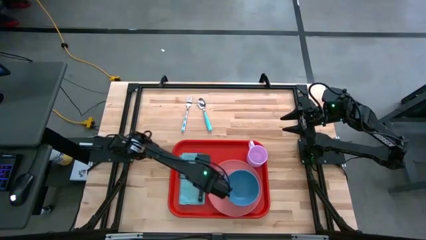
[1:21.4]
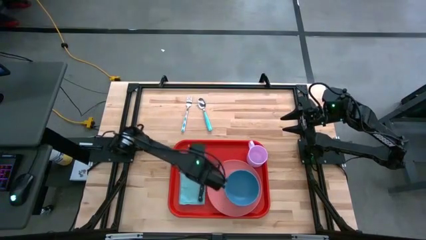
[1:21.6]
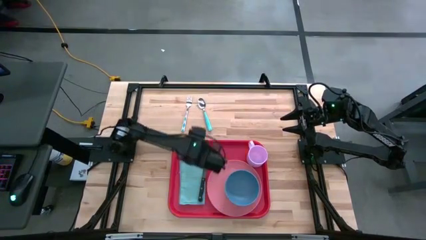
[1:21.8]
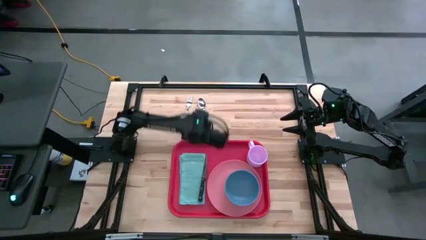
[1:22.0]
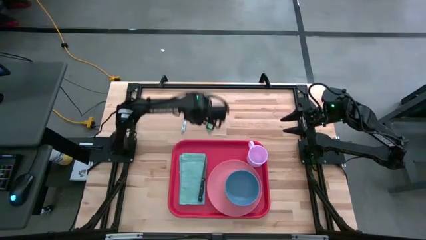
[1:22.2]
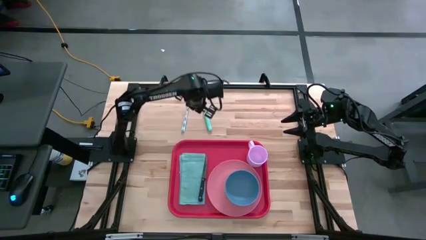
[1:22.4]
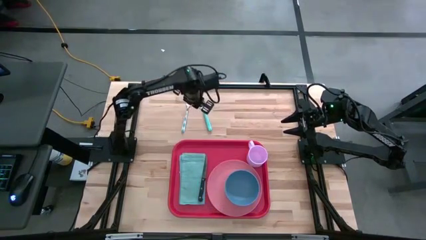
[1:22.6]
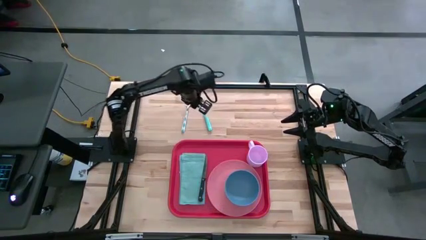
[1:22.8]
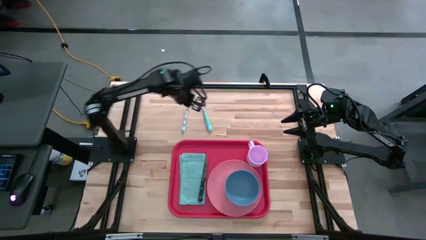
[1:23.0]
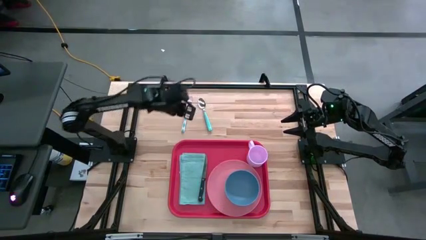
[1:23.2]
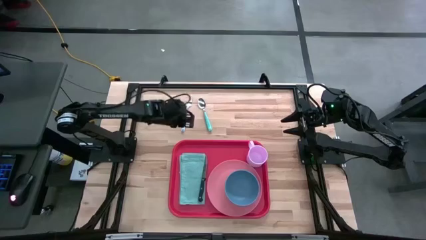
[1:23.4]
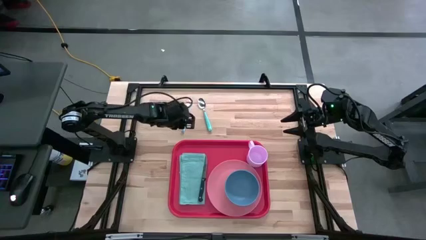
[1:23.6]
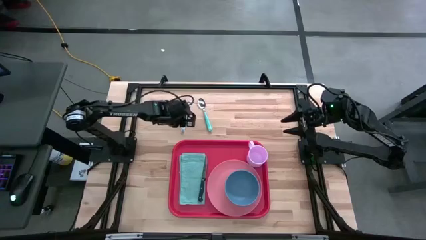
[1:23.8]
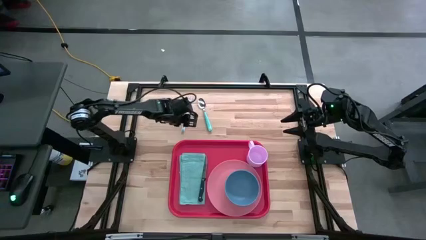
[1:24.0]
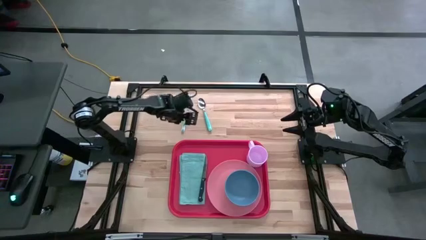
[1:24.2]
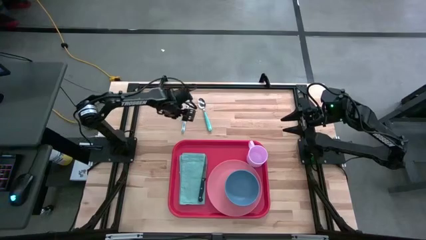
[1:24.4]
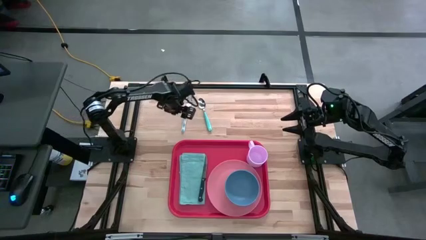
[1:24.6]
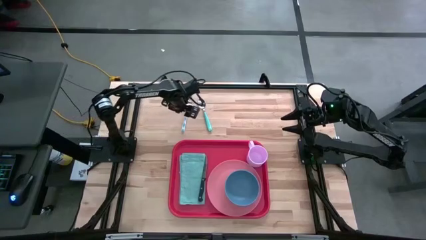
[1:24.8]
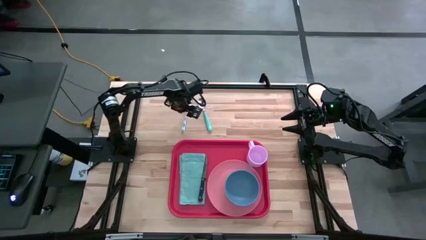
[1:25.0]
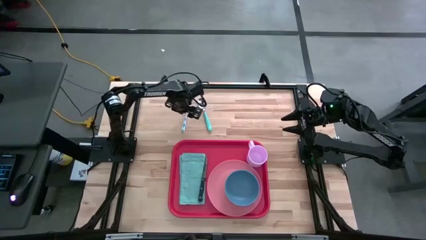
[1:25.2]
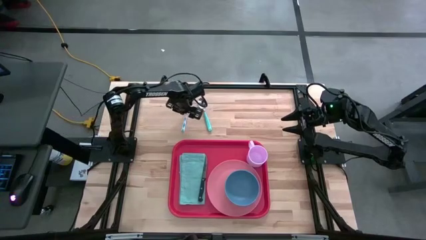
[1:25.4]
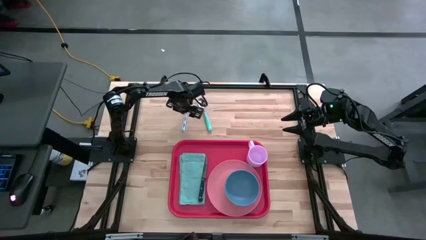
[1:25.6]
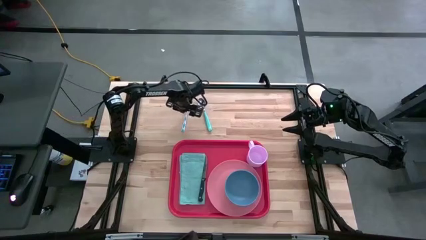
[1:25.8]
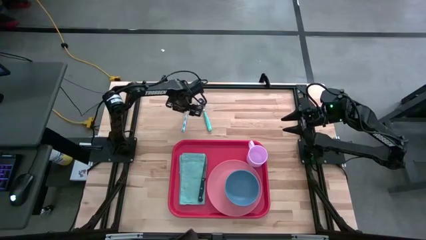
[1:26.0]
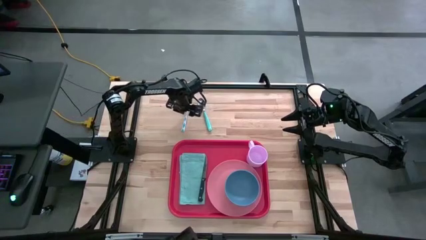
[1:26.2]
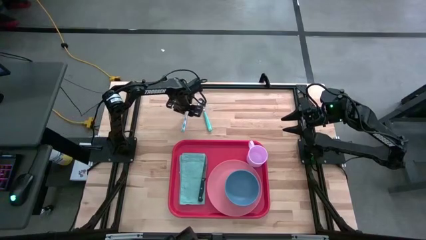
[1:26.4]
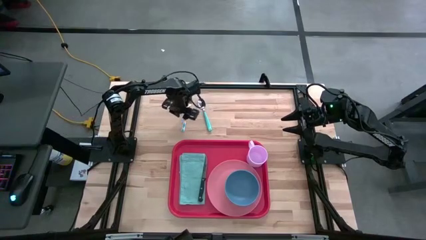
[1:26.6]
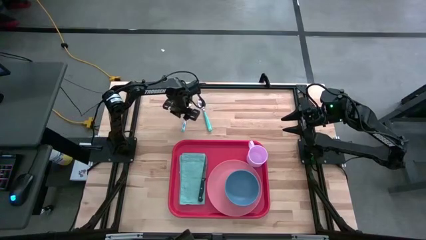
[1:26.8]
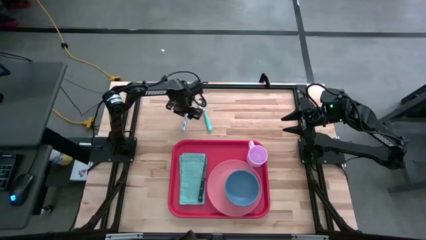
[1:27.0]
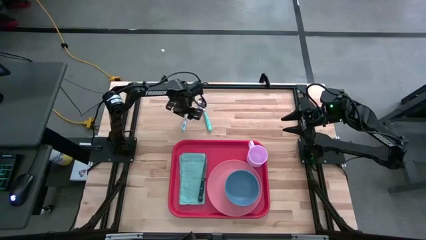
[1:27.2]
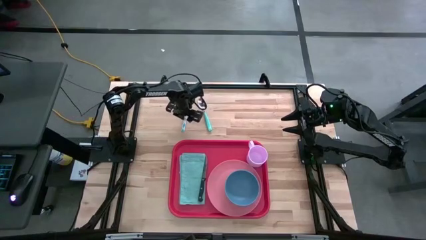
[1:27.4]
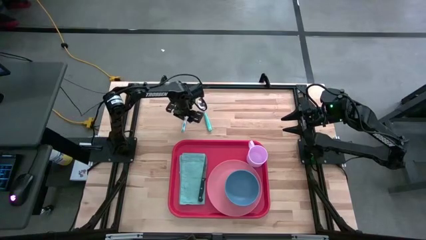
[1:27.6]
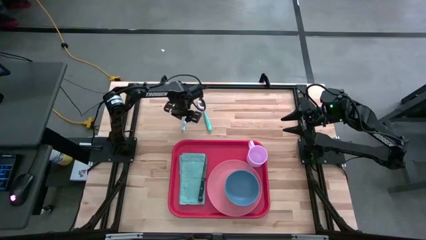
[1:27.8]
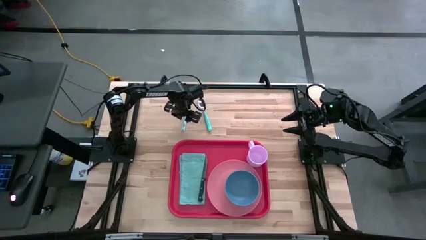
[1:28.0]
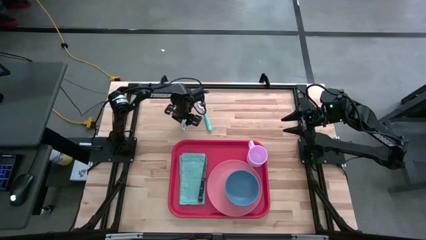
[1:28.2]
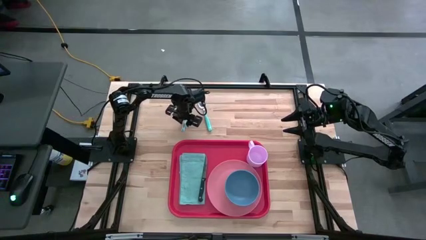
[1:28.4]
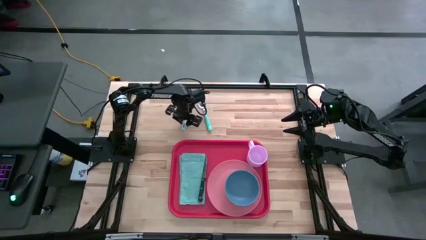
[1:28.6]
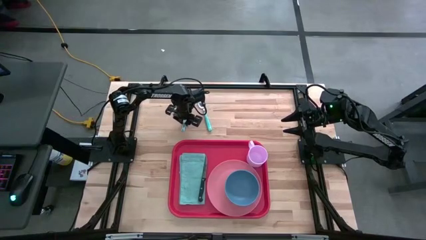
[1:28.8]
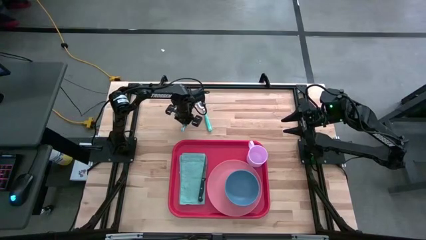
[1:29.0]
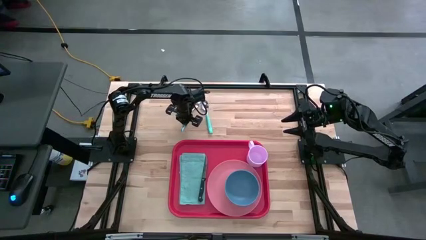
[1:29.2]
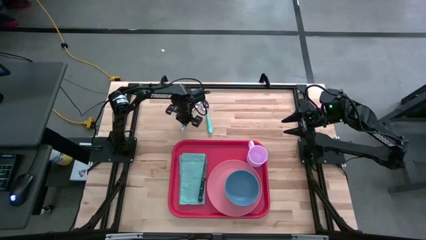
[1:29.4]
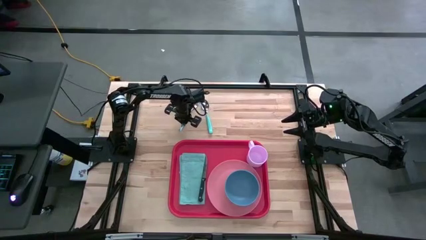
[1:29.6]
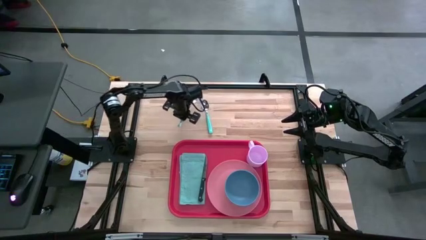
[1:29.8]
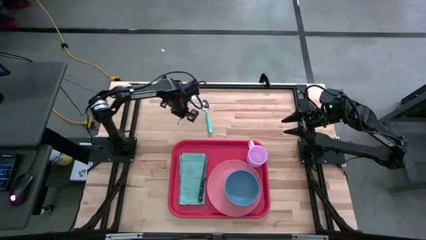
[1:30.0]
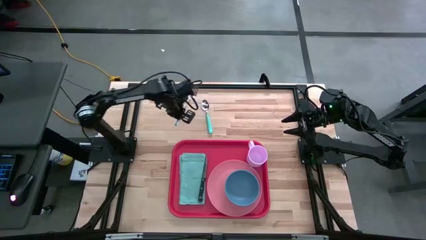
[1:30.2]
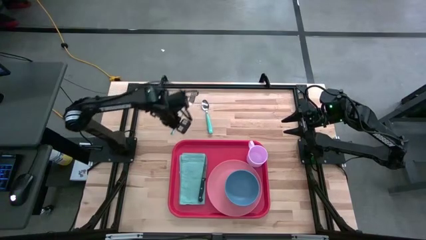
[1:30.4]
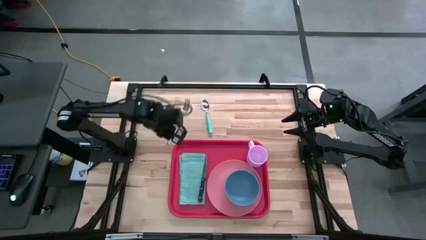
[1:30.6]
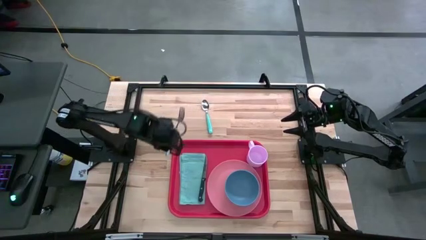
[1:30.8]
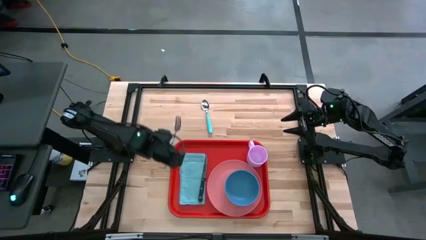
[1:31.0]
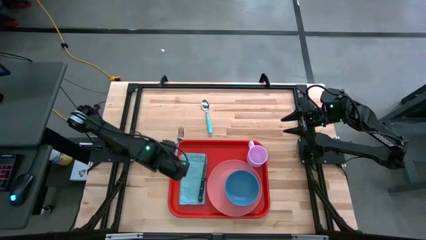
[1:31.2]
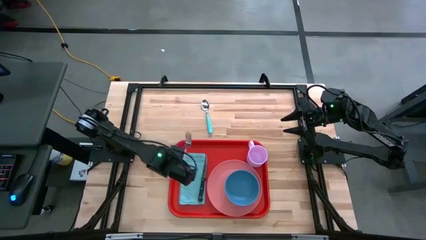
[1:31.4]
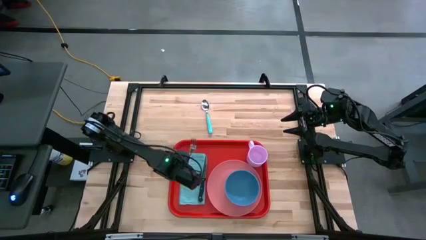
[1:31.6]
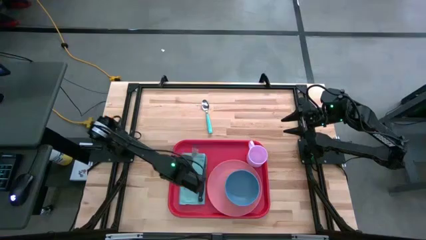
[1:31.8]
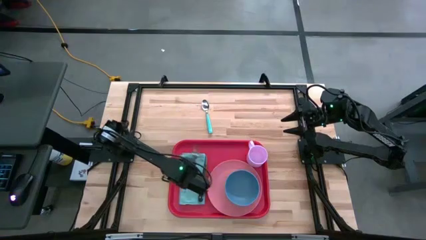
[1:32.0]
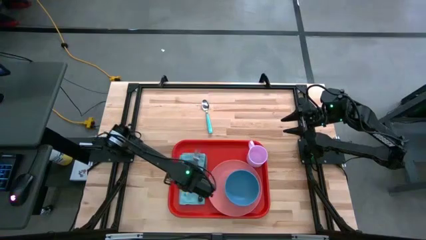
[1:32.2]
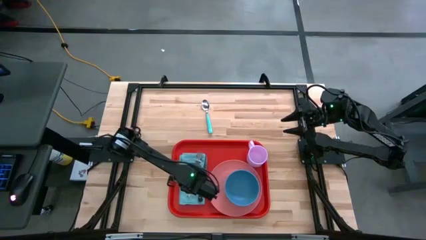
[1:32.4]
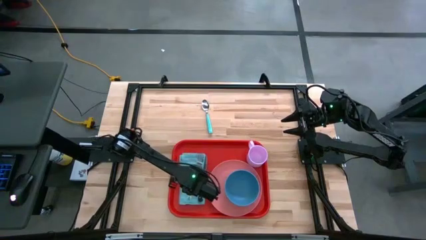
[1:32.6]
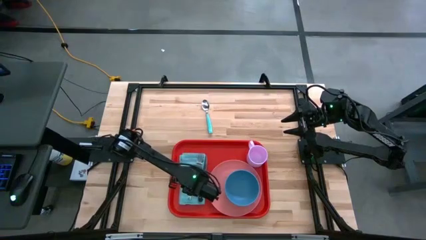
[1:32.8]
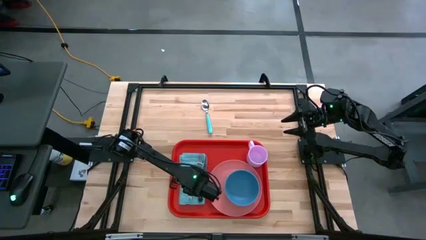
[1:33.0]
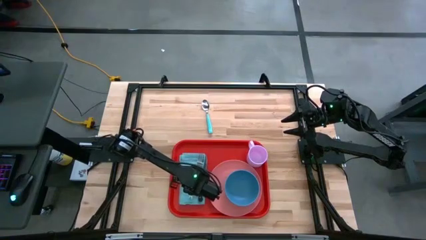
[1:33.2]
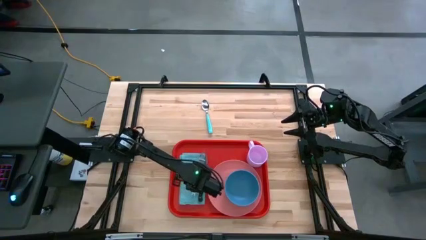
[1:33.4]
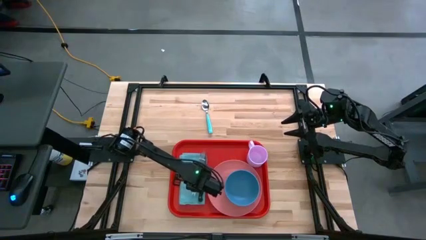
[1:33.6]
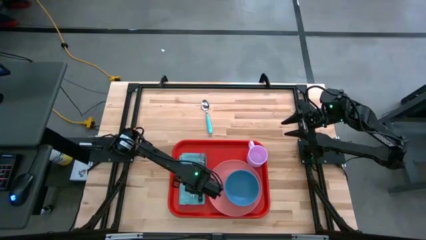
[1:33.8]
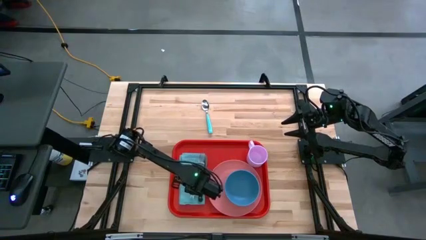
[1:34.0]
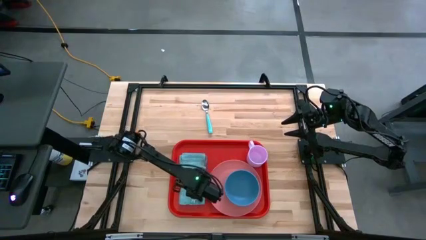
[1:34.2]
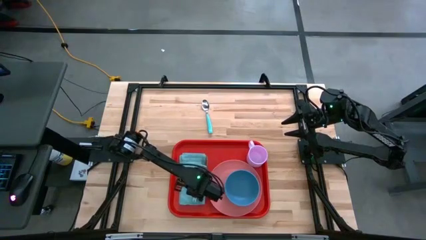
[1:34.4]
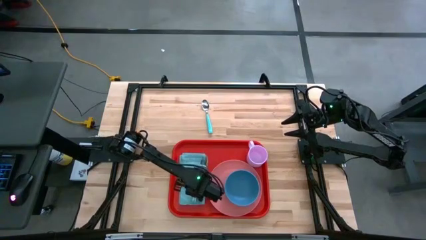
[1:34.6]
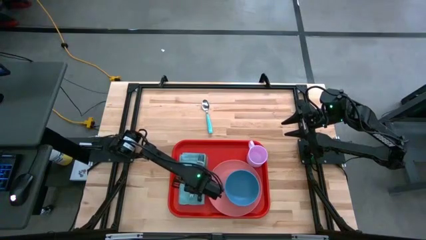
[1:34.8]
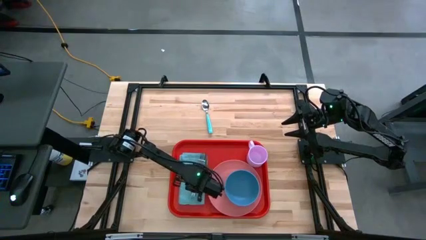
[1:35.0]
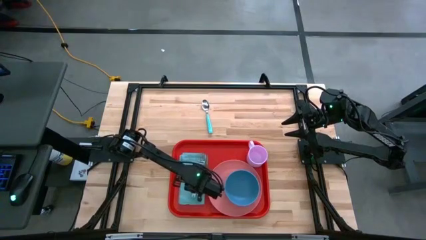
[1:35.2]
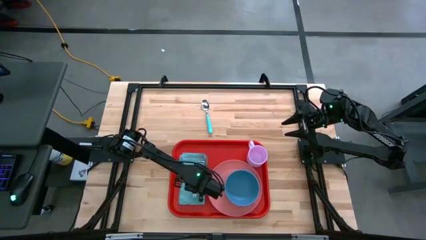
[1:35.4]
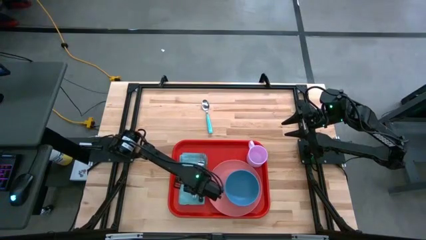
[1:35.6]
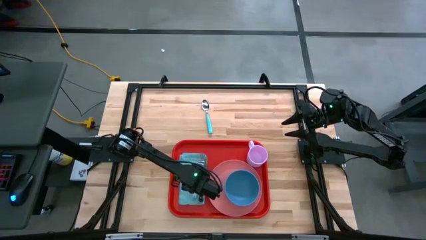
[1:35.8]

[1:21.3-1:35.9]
Task: Set up tray
Put the blue and white patterned fork on top of the napkin to the left of the black knife

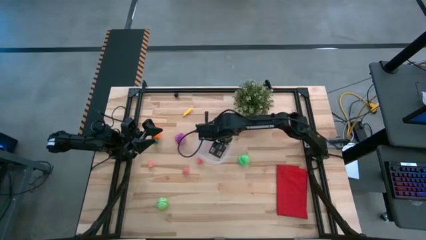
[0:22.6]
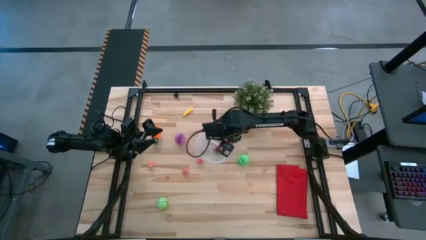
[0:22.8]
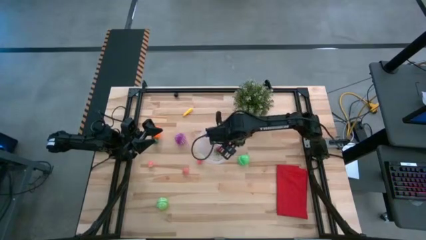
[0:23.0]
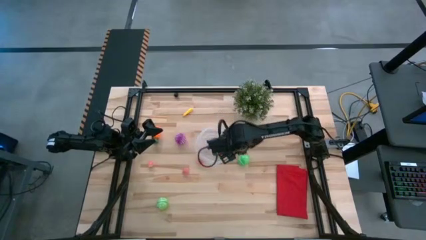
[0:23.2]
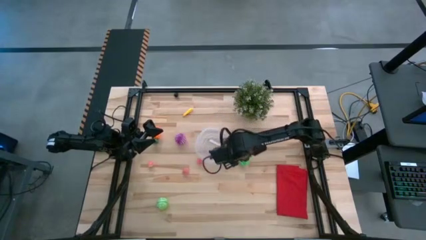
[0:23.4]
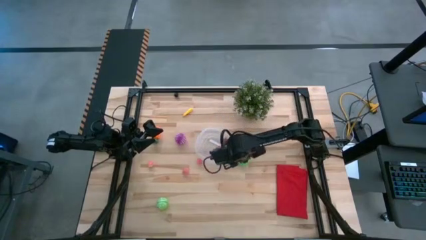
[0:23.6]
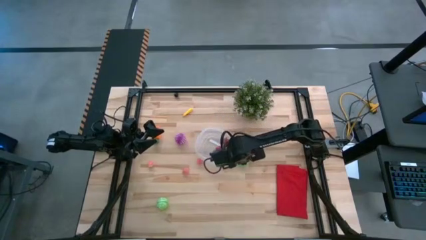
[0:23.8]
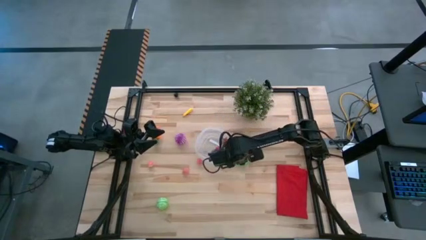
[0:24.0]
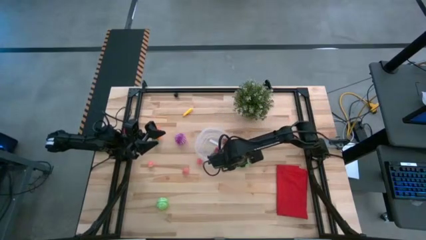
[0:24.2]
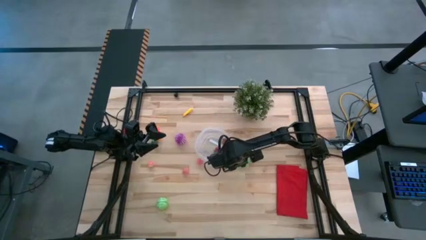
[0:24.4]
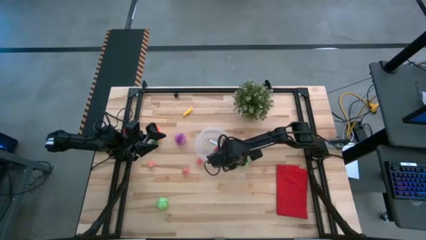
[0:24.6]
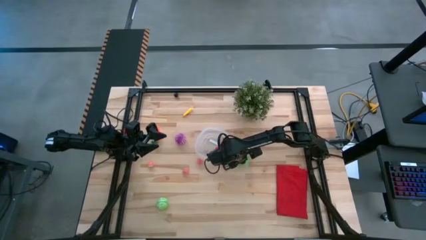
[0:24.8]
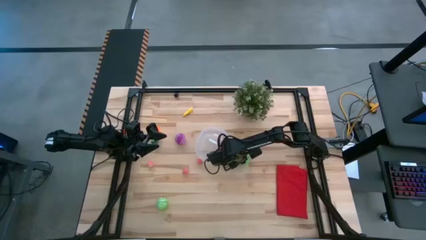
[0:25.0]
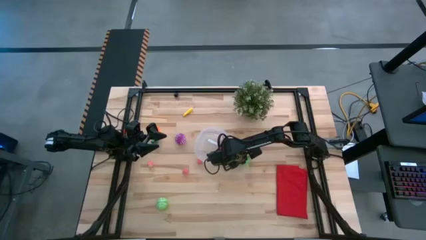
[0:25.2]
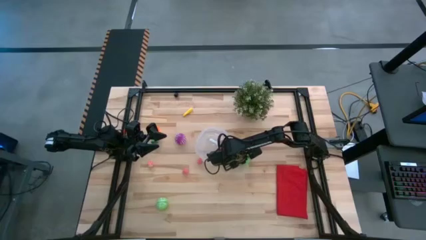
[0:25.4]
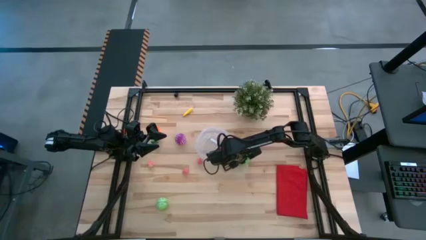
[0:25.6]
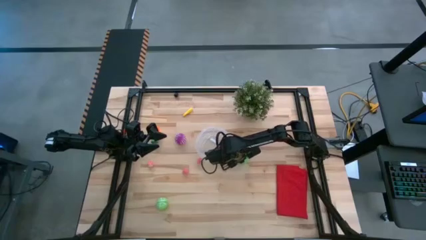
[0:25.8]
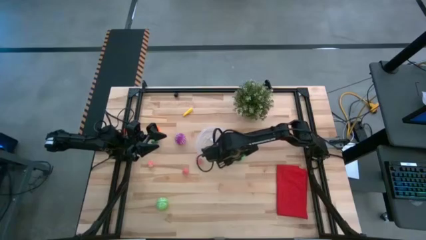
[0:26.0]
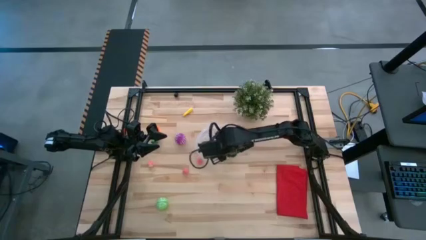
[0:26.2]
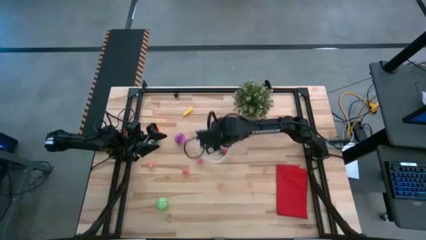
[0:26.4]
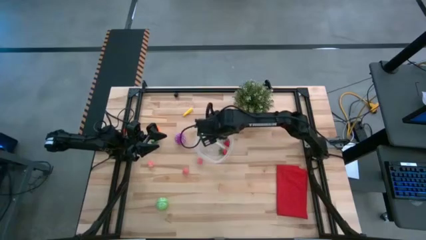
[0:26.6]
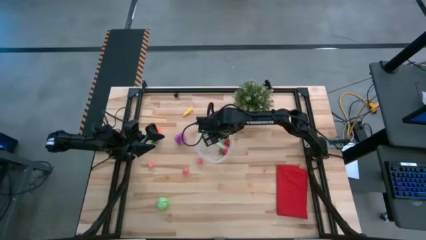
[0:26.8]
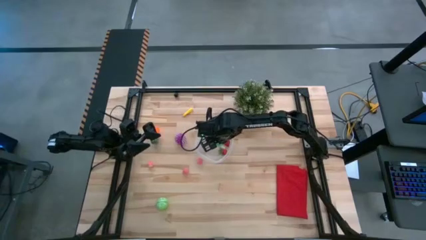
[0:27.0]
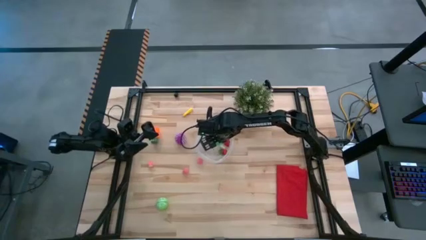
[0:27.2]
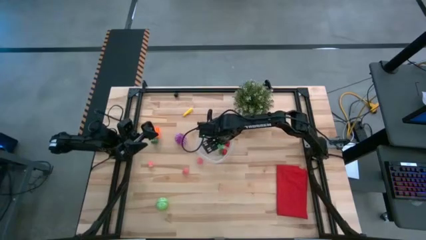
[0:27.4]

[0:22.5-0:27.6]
Task: Pick and placing Produce into tupperware
Put the green pear into the transparent bin
